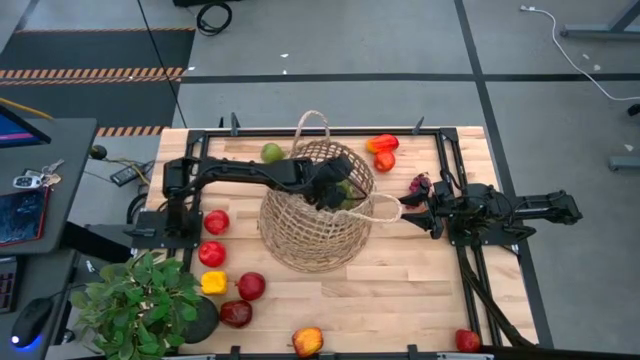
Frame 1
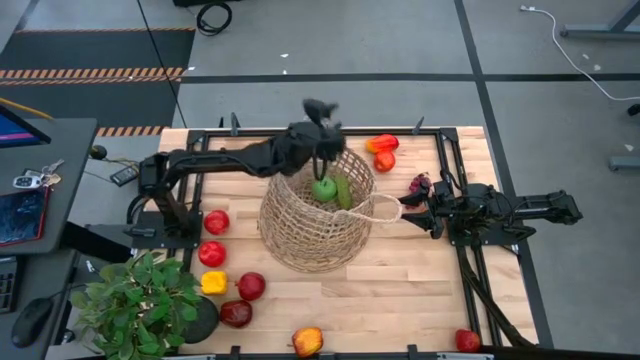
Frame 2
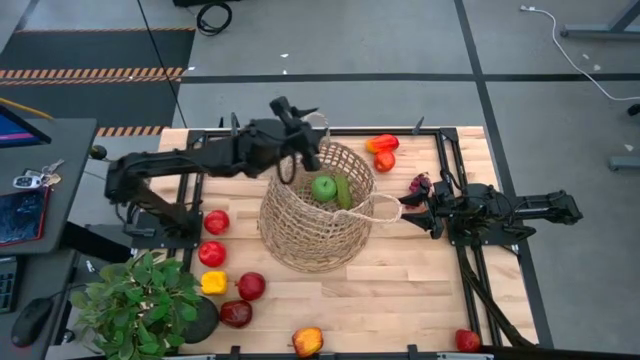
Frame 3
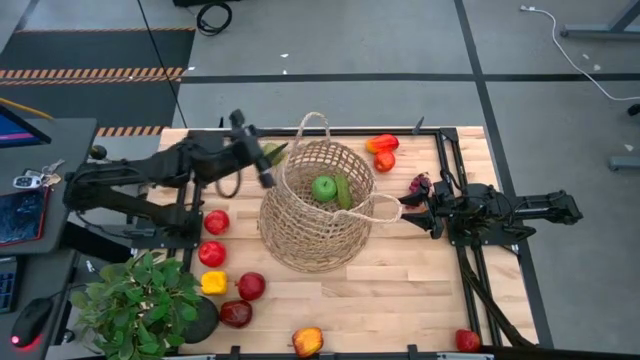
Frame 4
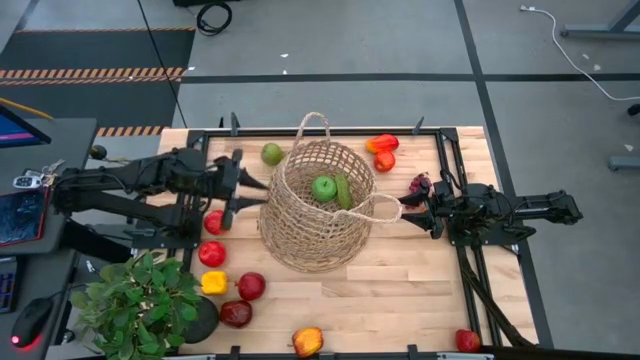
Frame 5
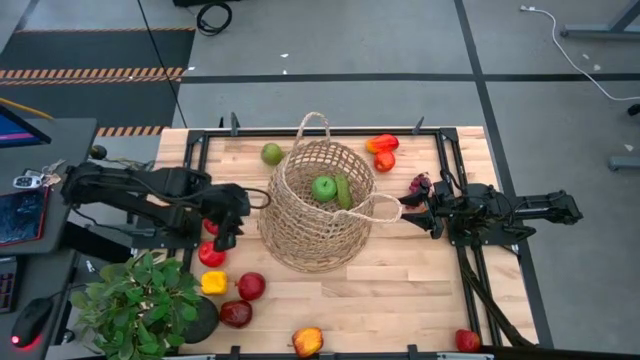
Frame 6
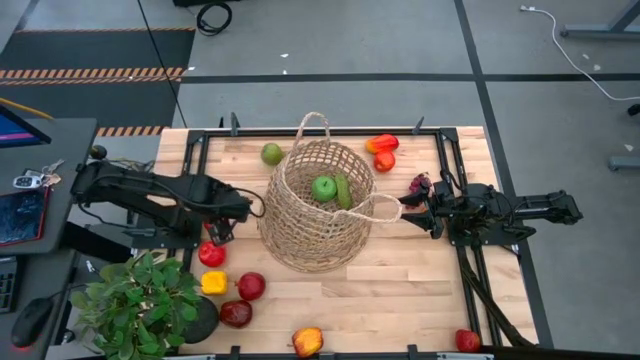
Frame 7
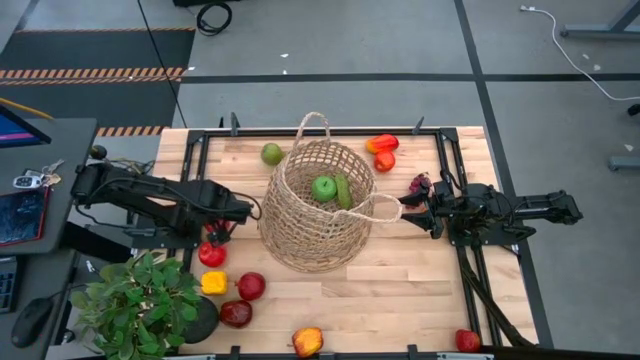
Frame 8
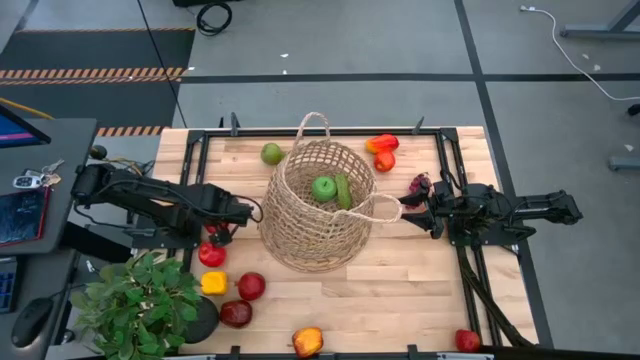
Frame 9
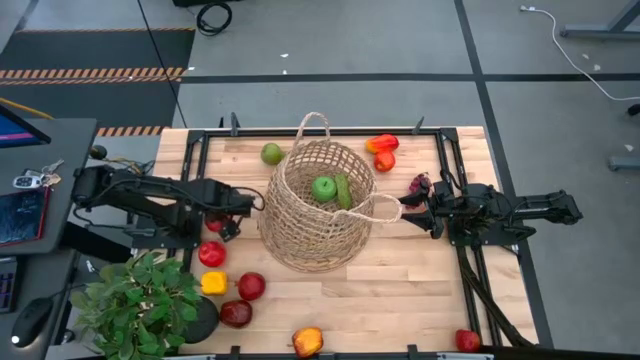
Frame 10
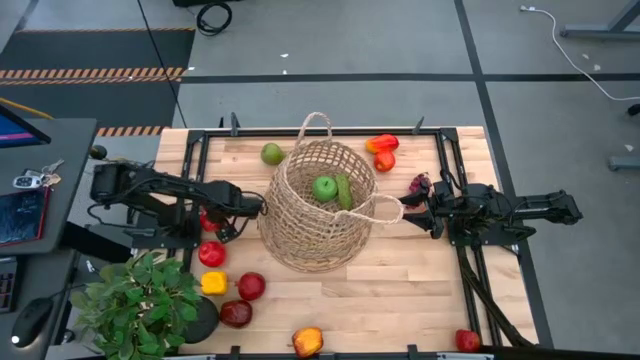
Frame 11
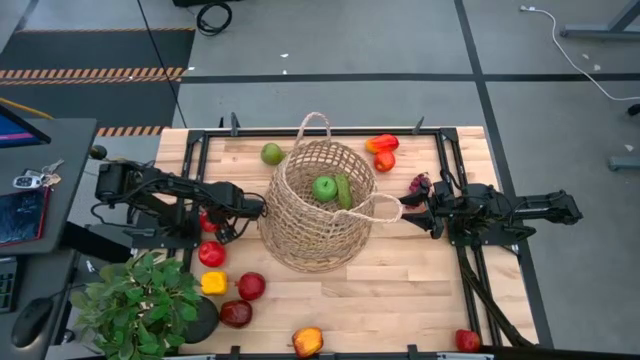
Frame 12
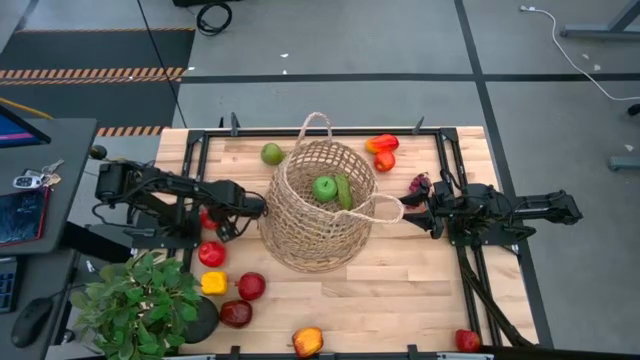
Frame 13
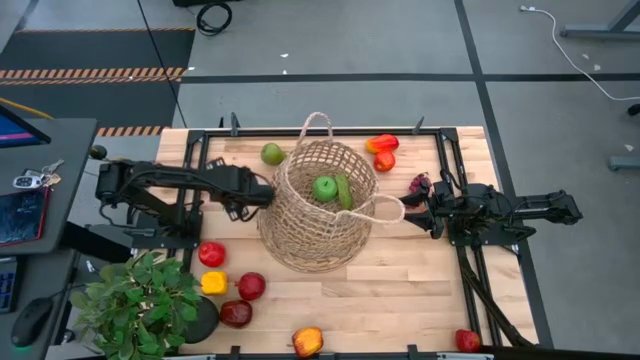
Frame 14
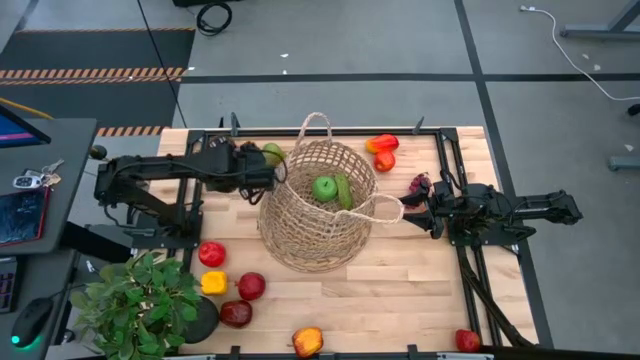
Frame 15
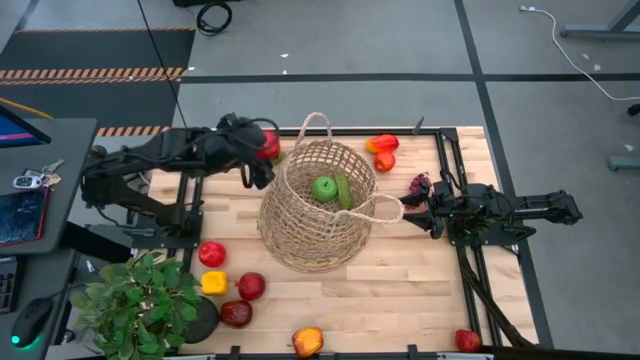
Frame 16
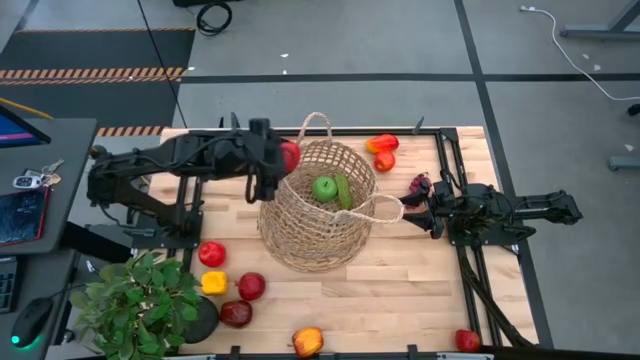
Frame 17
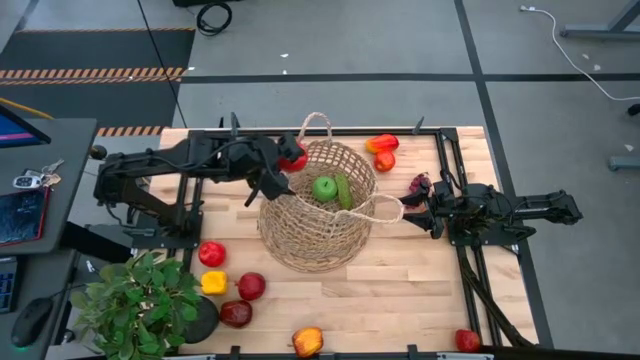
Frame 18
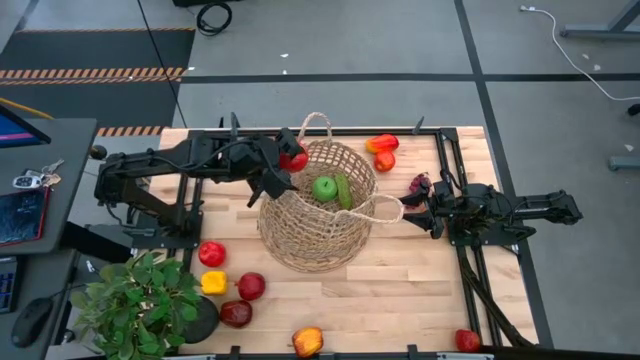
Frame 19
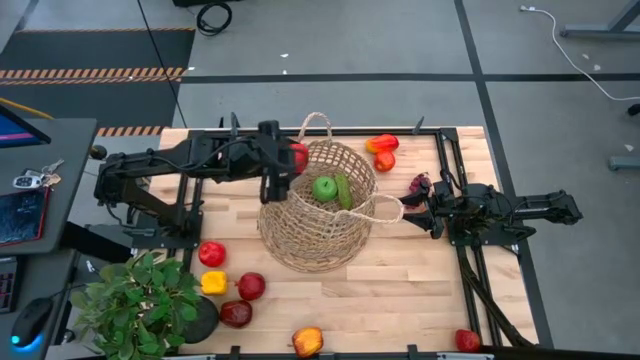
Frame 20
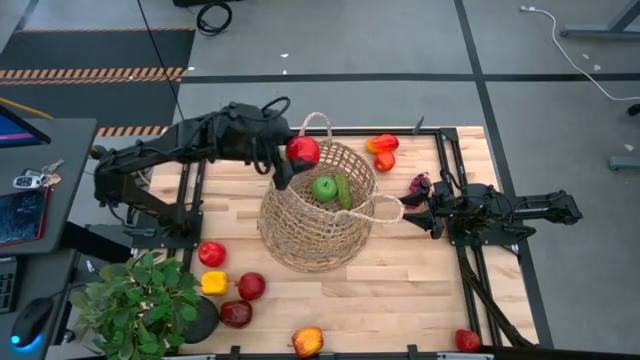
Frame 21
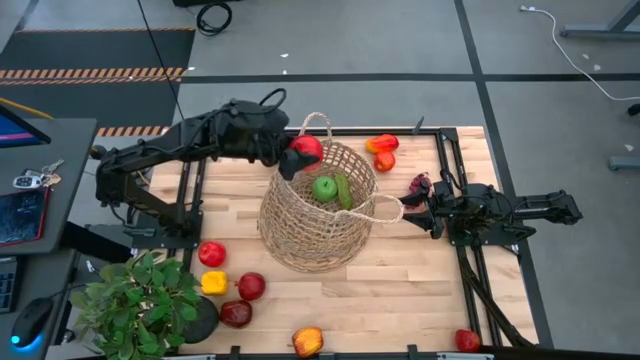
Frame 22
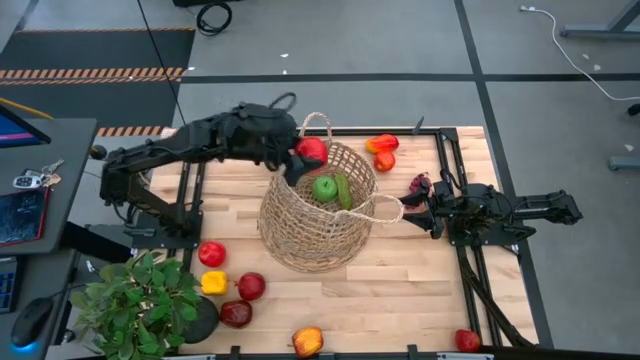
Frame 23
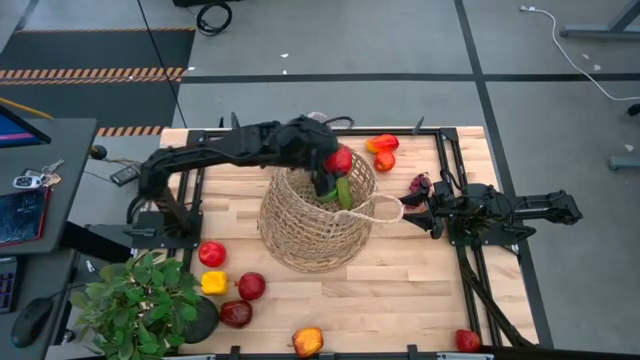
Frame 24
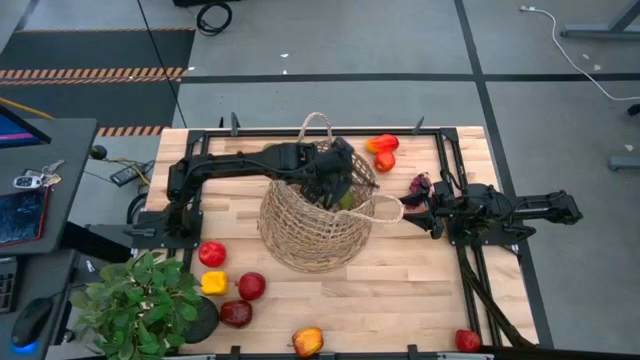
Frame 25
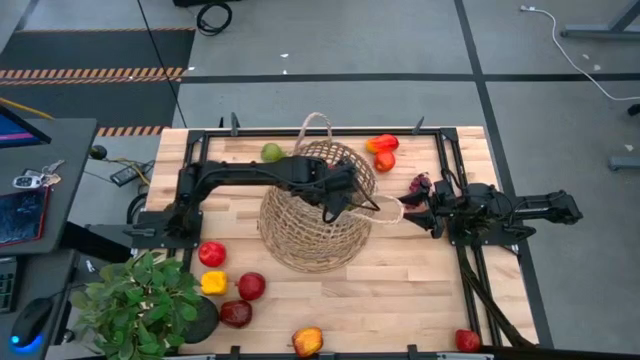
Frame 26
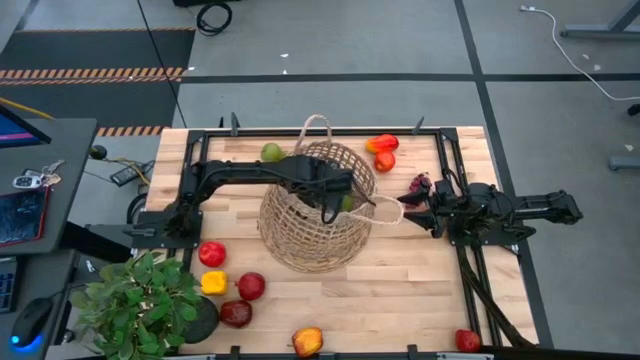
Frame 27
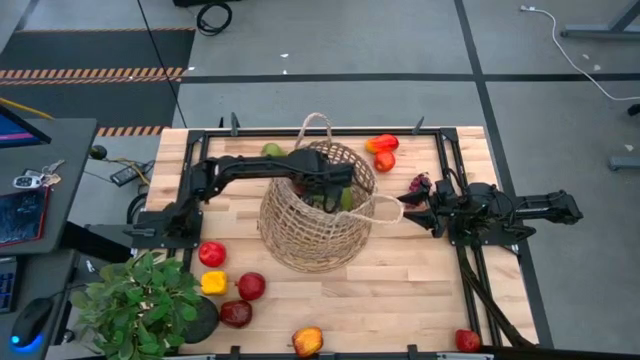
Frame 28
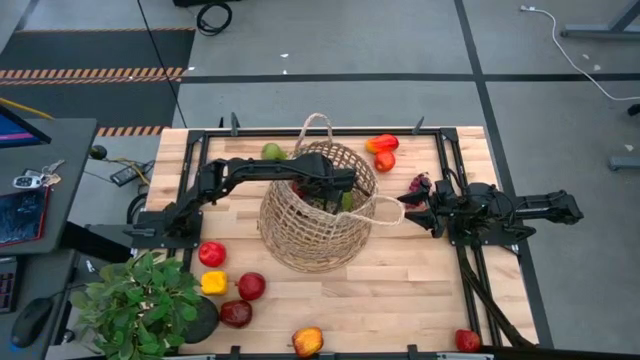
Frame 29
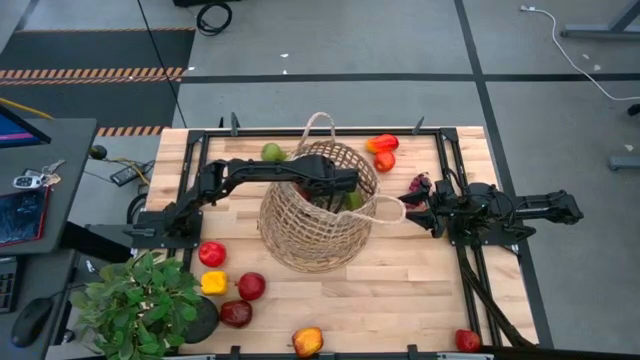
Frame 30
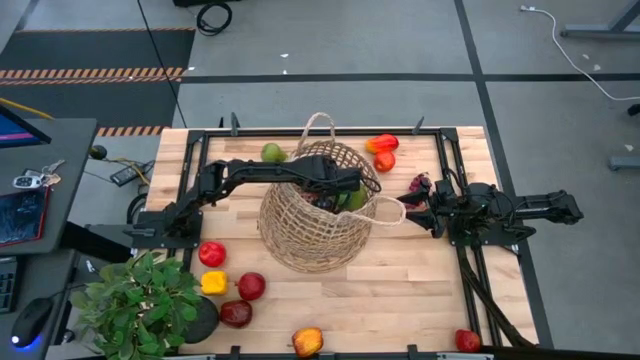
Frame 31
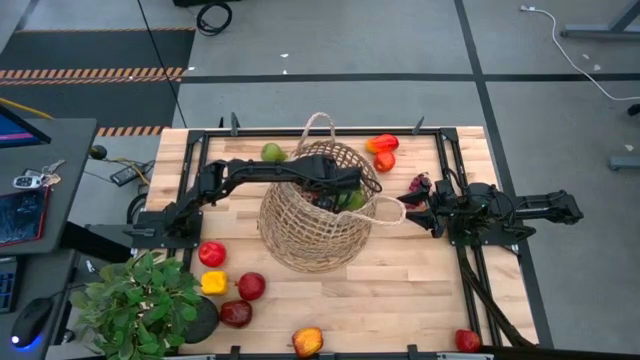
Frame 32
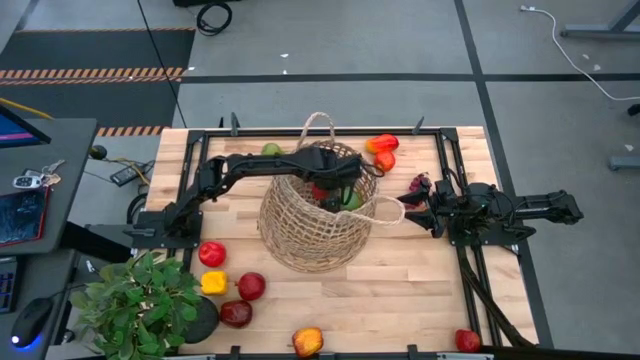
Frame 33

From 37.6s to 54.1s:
Task: Build produce basket
Put the red apple into the basket

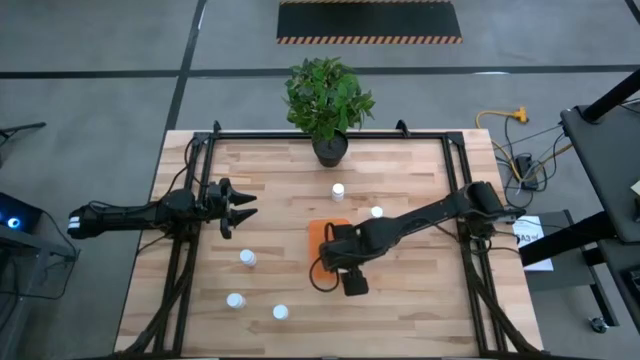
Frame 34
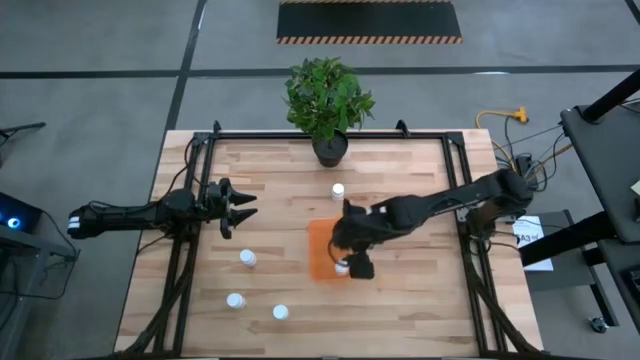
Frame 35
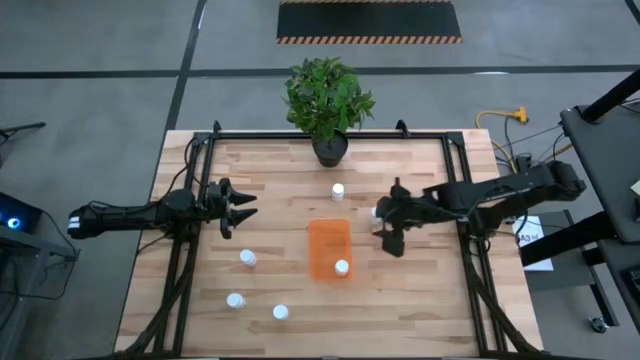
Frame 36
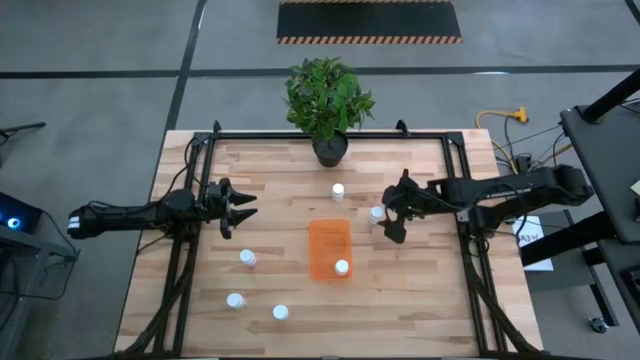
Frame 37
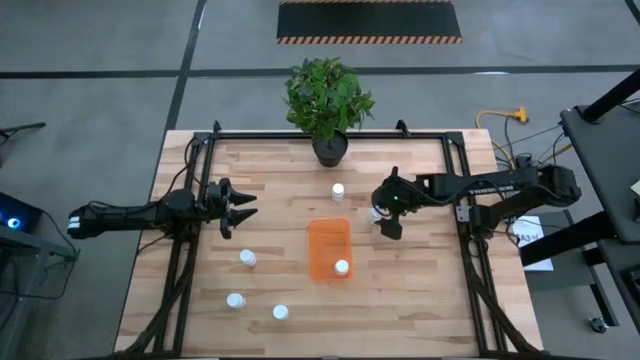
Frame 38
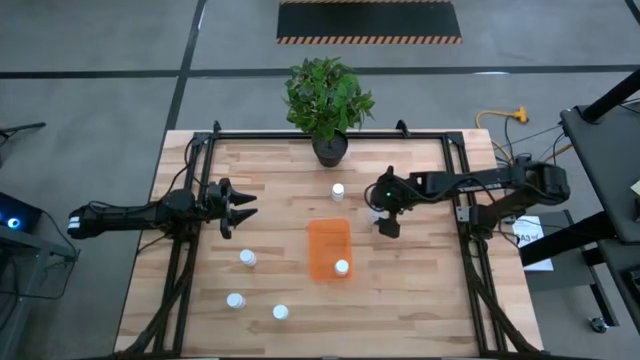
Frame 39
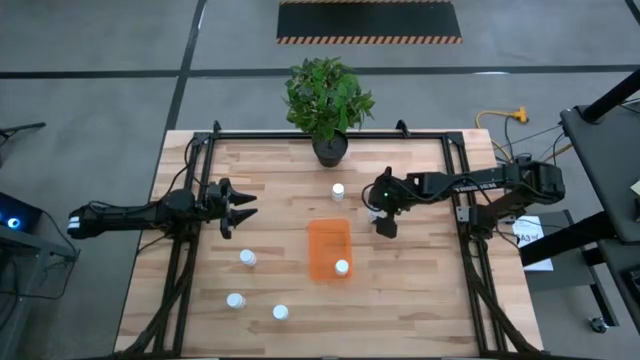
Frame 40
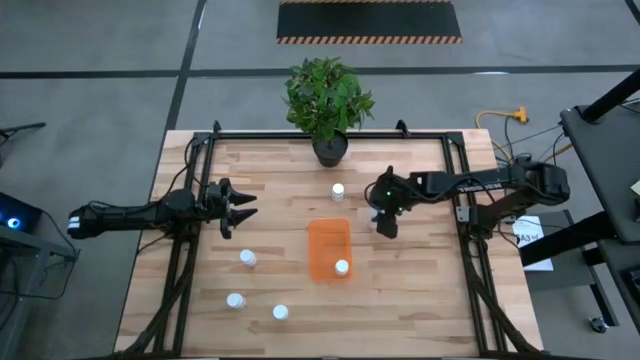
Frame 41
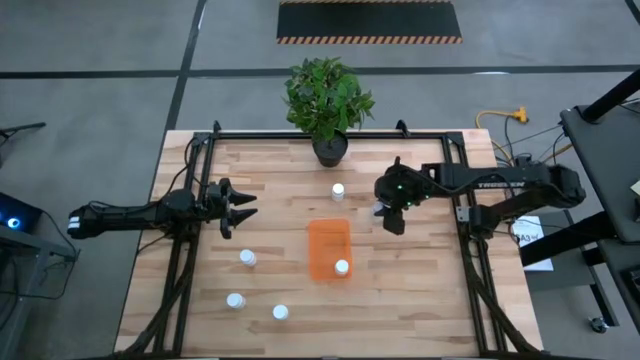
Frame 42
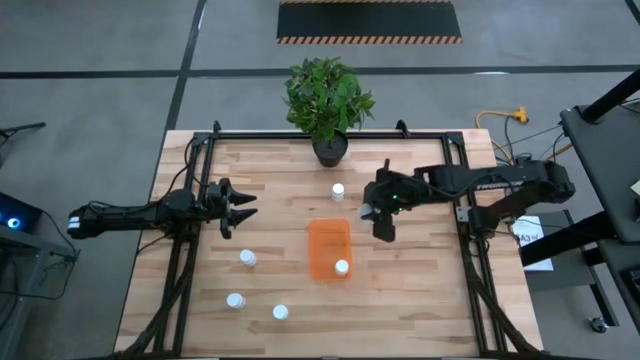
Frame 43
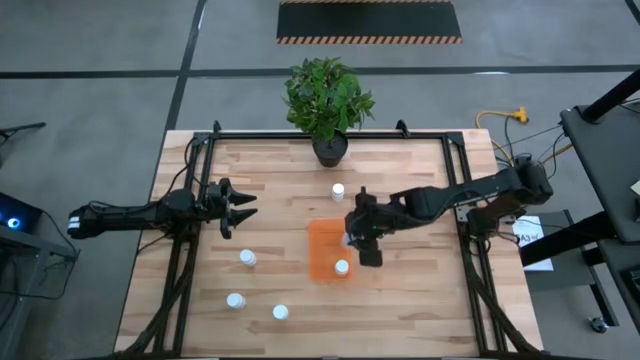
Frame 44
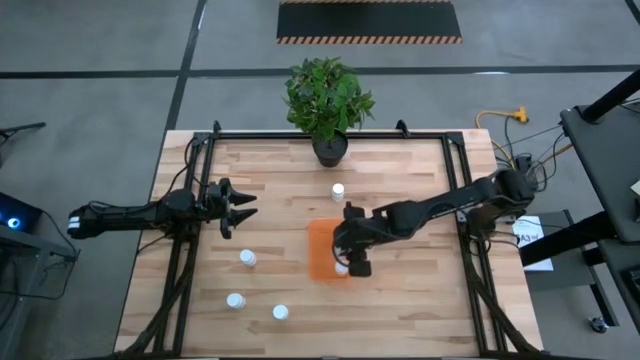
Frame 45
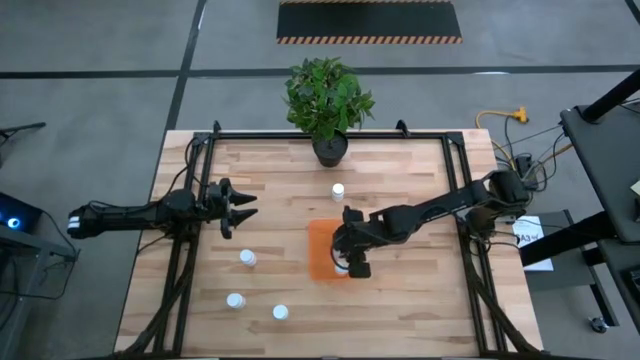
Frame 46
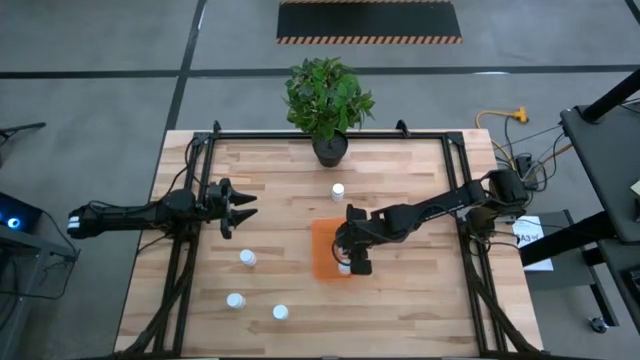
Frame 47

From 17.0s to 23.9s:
Task: Pick and place pill bottles into a basket
Put the white pill bottle into the orange bin
